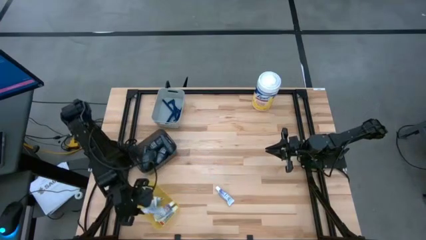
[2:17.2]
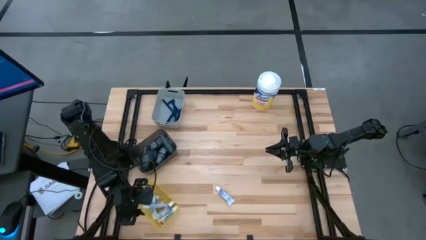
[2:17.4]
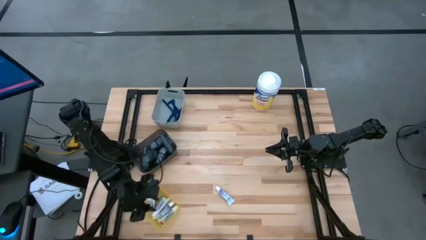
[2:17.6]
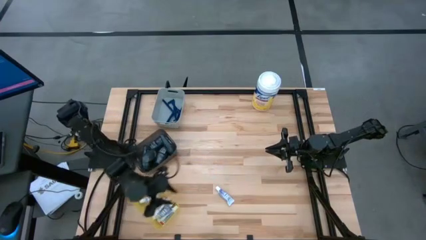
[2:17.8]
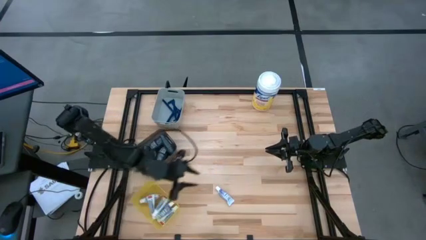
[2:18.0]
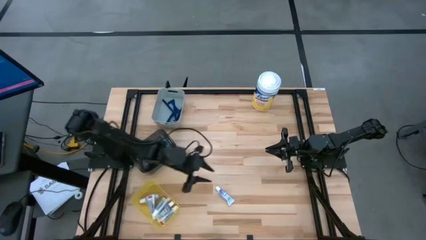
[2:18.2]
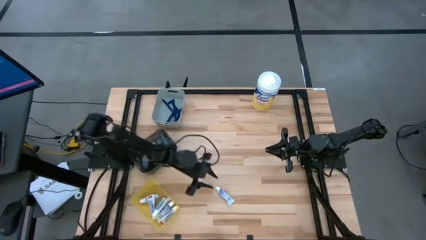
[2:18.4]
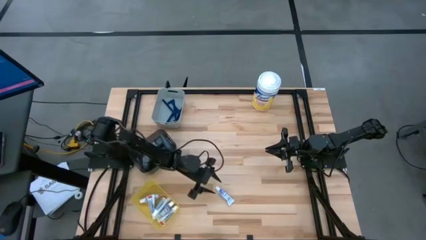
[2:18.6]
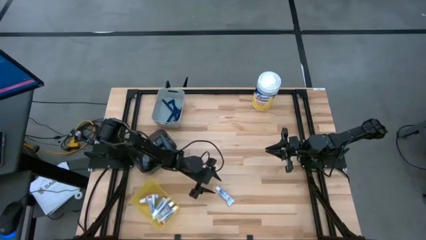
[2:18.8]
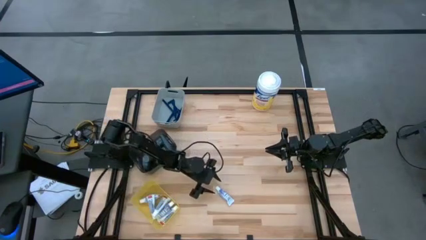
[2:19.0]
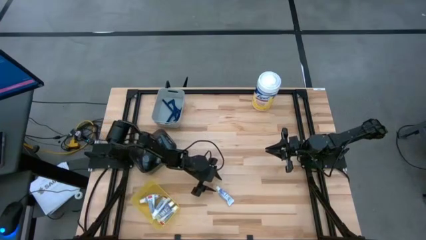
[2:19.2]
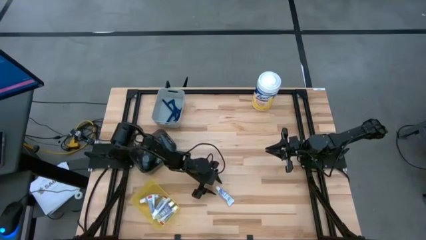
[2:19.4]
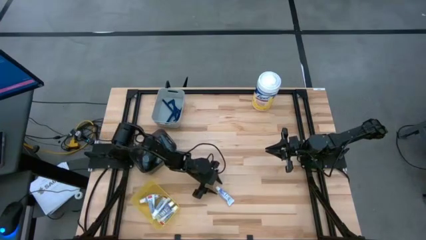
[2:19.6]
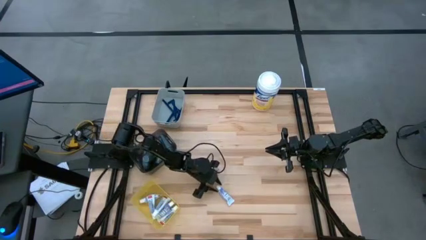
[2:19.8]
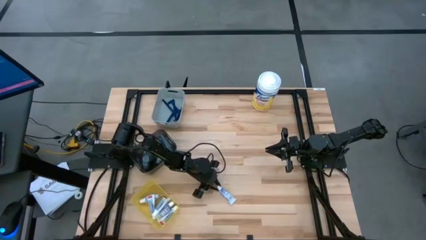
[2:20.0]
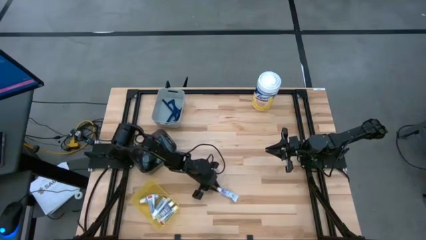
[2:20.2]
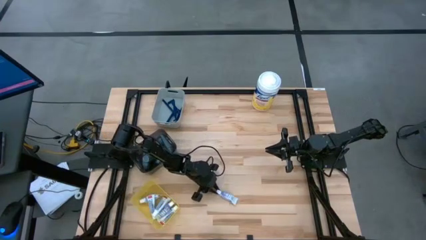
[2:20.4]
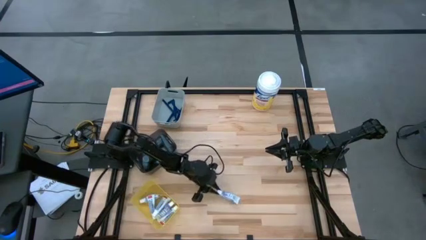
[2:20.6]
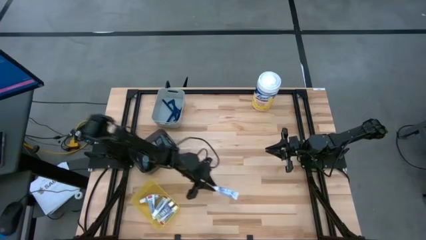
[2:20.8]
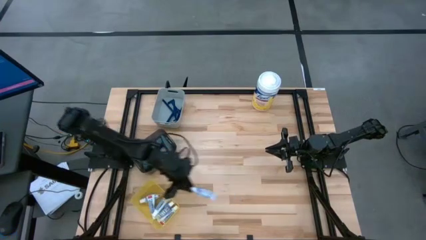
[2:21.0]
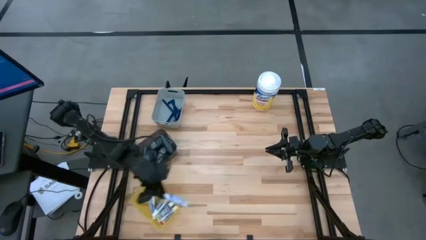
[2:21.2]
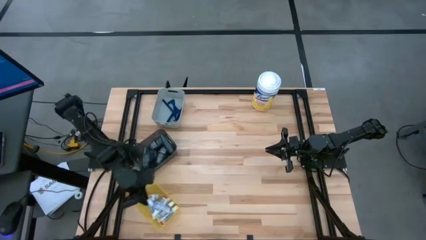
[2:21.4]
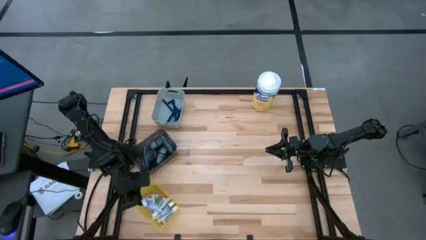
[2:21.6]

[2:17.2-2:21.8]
Task: Pick & Place Travel size toiletries
Put the toothpaste into the yellow bin

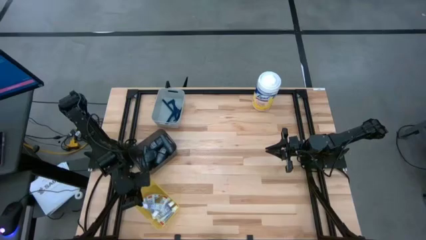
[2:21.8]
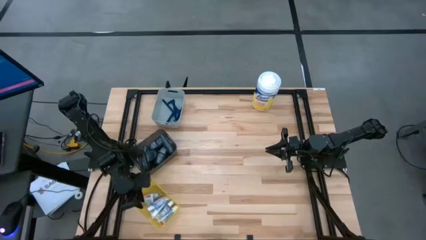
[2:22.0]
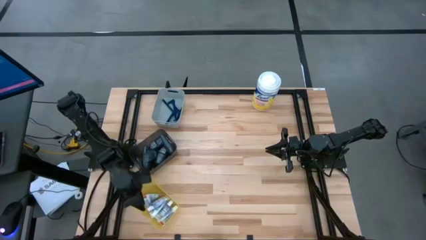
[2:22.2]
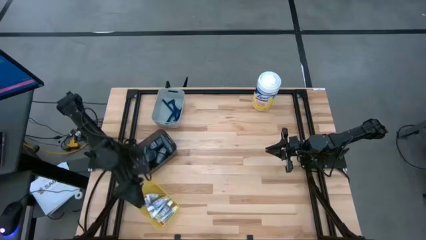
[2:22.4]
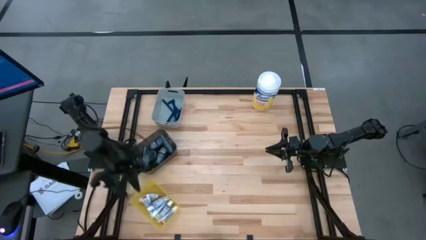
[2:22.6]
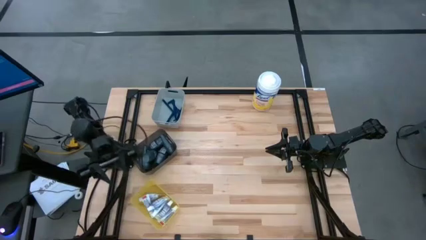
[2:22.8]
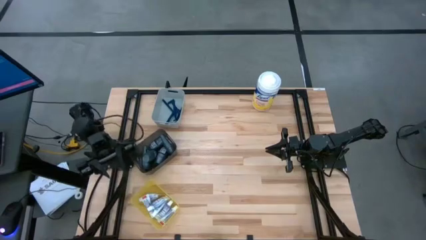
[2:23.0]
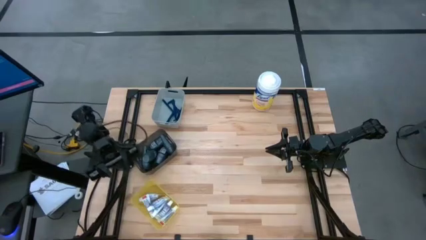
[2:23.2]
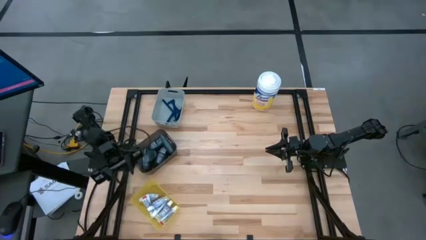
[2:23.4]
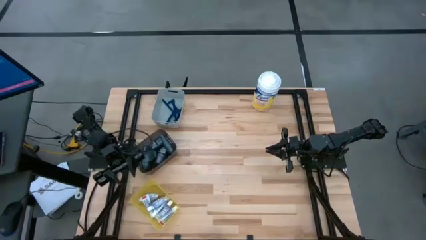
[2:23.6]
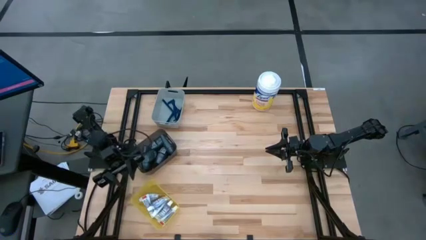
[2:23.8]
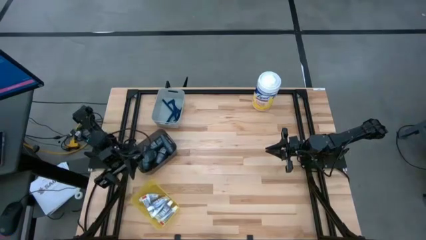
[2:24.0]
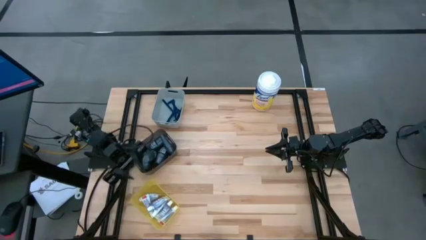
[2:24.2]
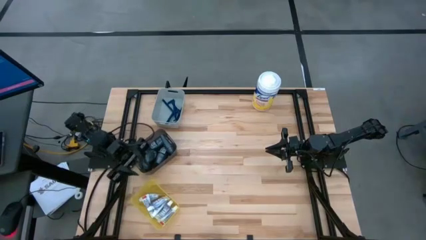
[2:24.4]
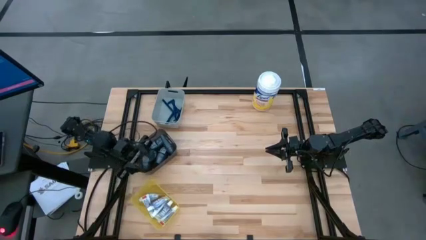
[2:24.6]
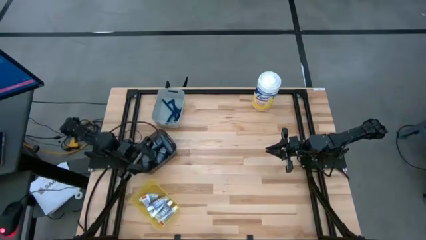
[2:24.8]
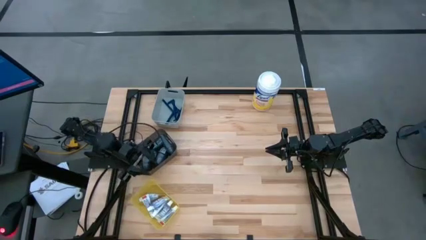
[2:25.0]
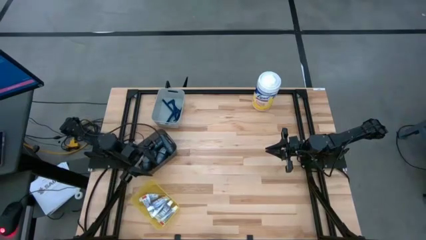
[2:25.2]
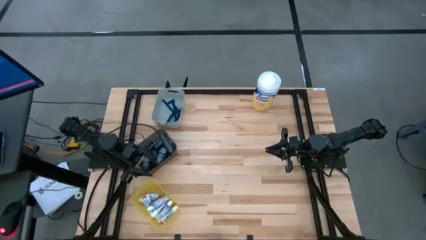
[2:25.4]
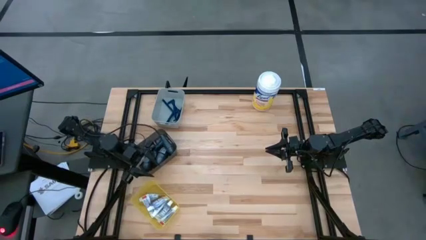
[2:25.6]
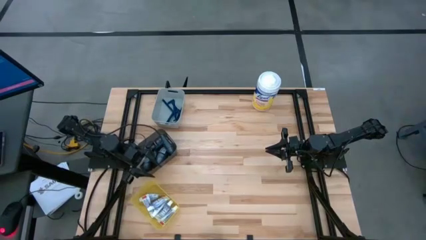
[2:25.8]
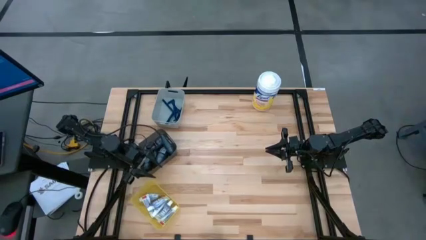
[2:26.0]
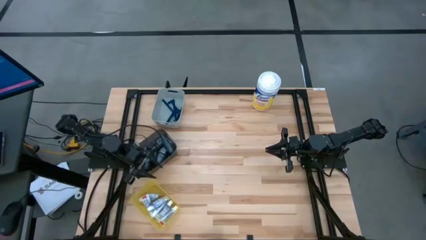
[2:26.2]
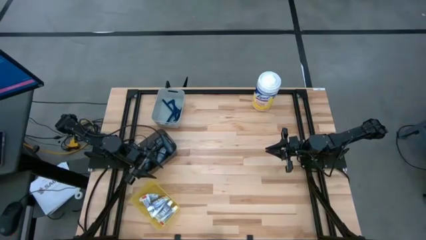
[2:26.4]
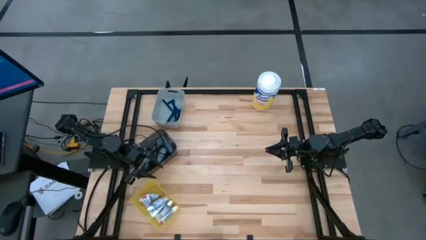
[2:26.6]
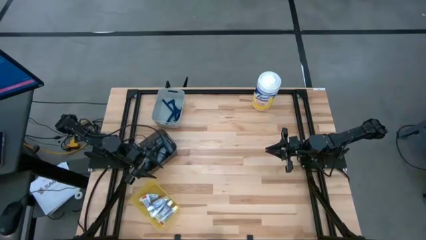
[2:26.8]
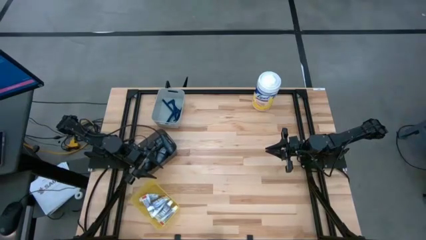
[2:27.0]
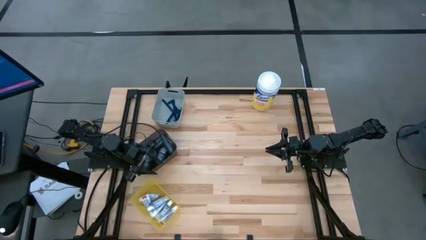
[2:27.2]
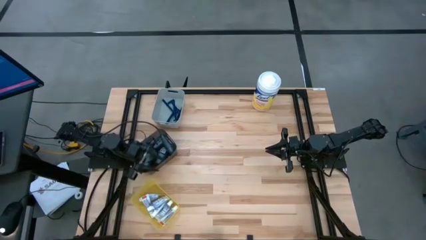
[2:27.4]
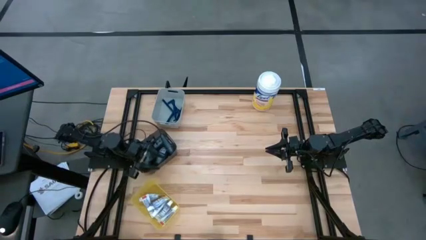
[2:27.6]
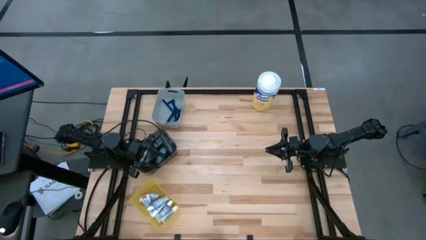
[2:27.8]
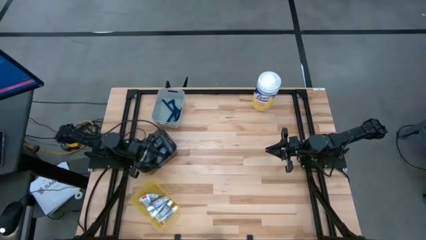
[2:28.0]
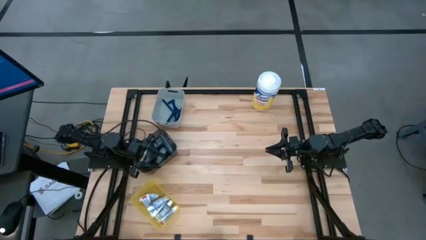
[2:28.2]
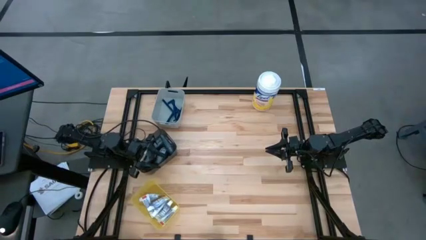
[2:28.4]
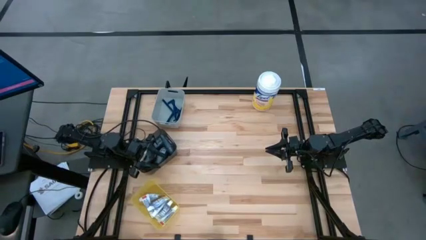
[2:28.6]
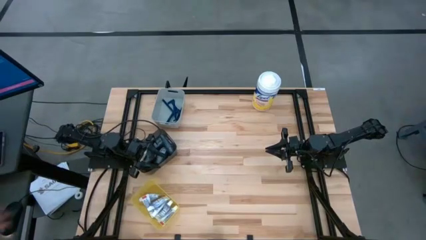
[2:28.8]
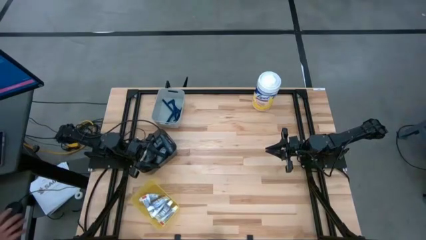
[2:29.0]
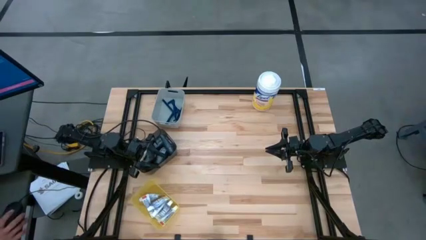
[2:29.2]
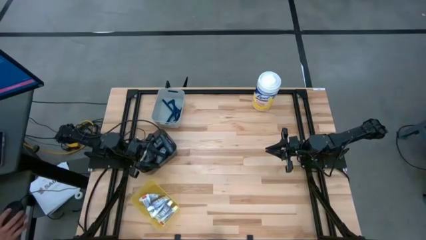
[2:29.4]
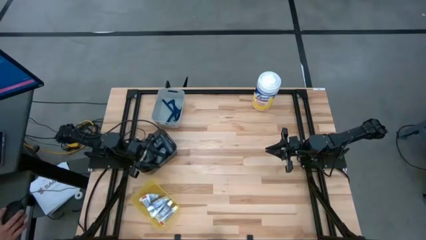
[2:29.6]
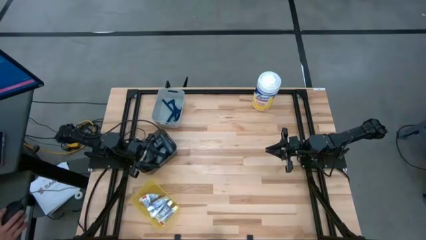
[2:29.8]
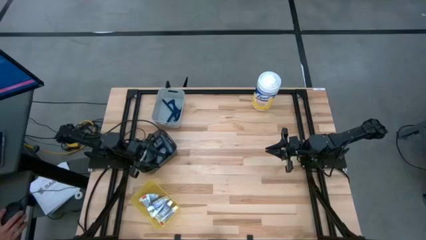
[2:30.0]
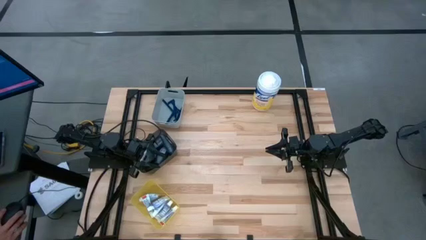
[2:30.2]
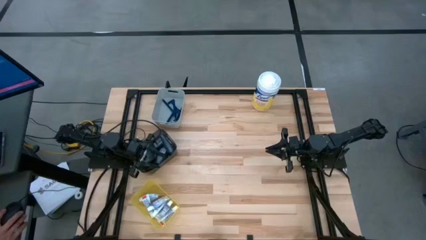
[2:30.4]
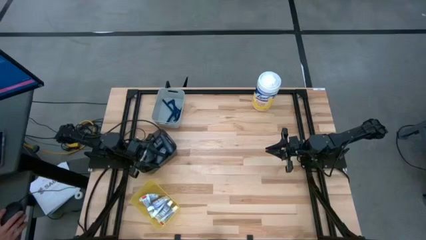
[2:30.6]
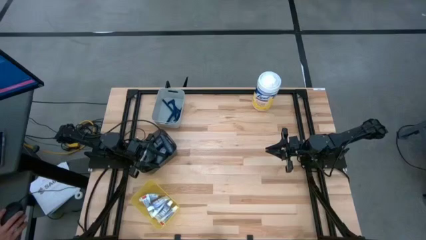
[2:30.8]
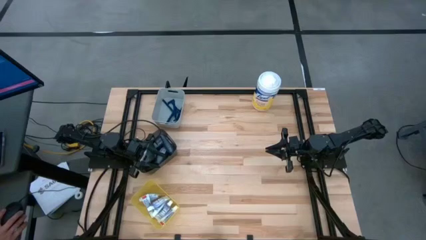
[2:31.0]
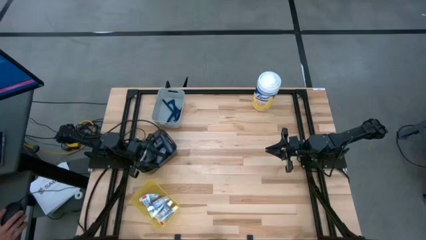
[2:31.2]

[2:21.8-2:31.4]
Return to Home Position

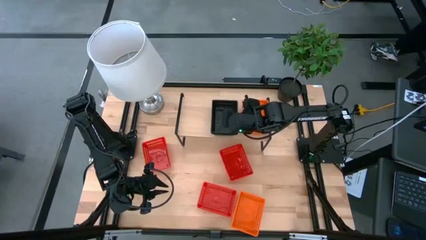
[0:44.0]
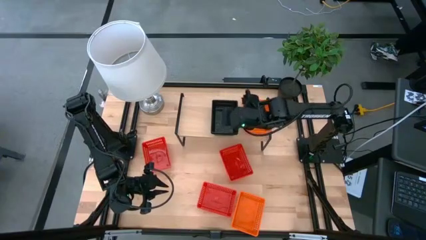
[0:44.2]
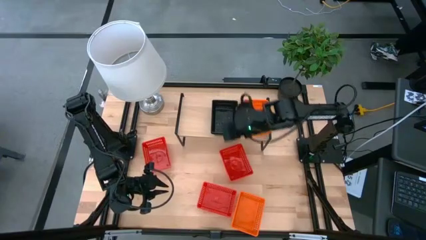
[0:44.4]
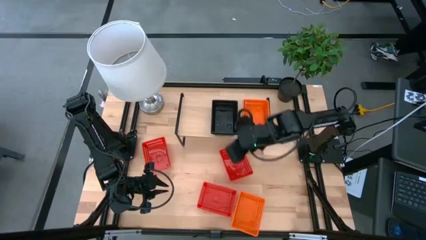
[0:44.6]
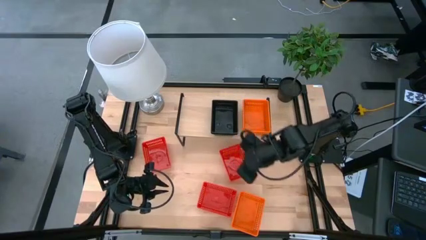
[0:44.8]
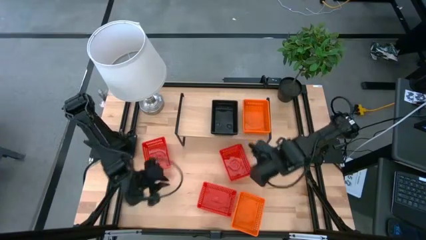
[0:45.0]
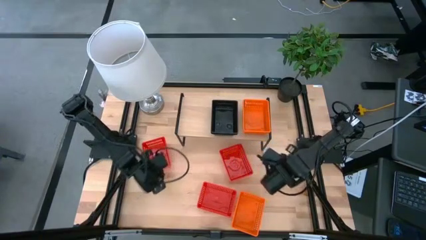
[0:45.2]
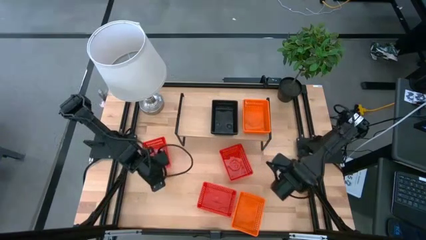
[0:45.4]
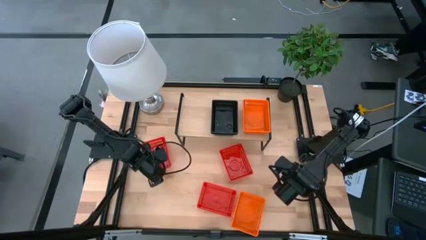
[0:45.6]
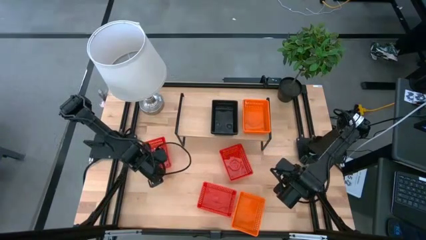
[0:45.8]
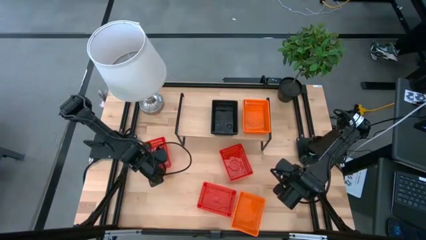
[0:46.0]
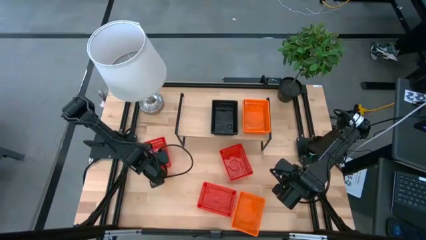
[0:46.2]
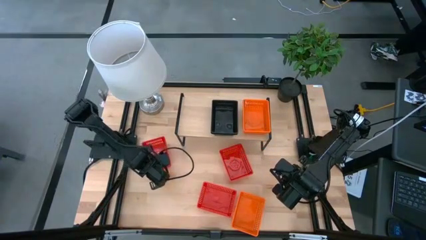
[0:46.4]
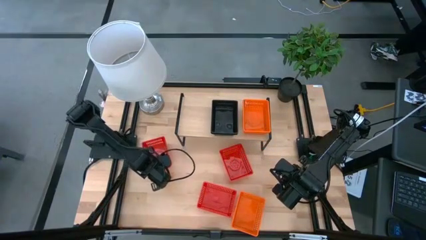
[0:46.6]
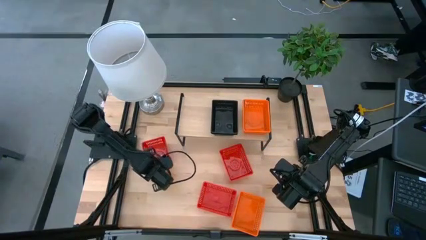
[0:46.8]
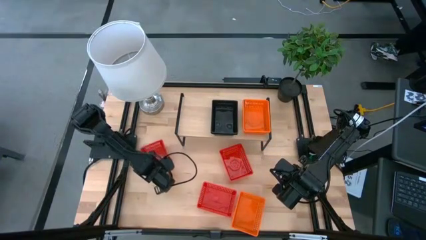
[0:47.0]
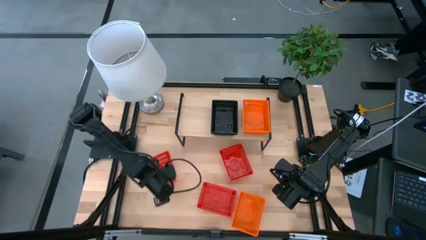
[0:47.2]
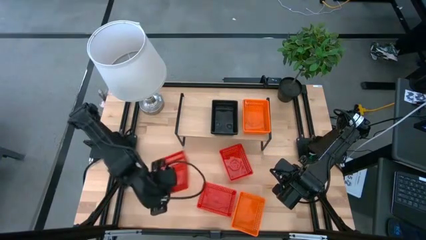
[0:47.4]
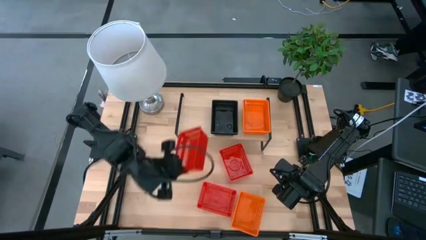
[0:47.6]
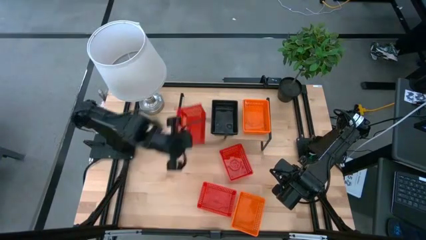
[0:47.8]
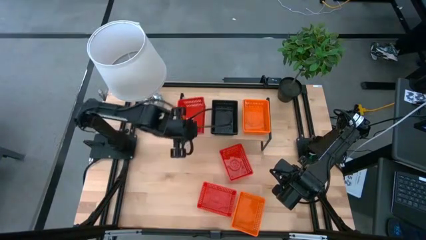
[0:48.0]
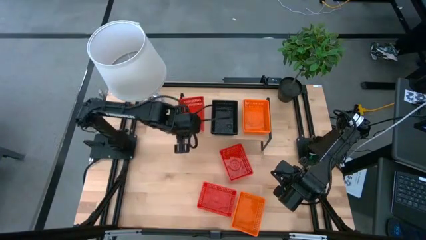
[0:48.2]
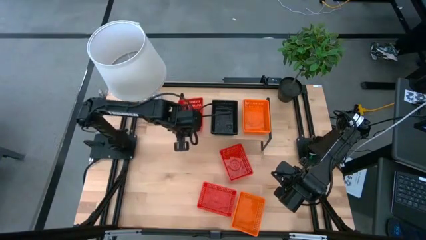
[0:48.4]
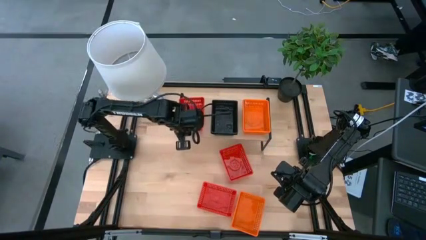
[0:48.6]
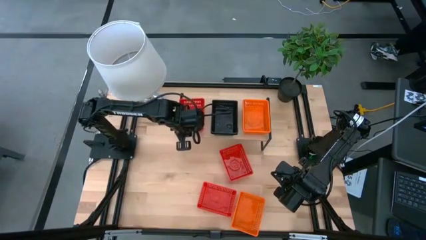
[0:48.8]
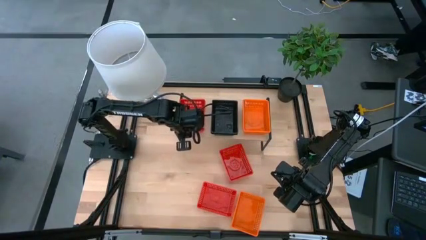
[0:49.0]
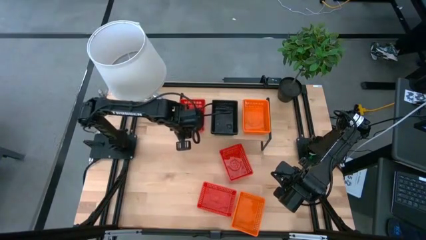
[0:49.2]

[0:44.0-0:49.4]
Task: Stack baskets on shelf by color
Put the left red bin on the shelf
